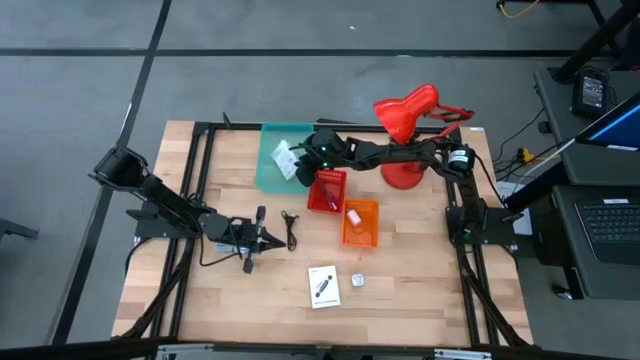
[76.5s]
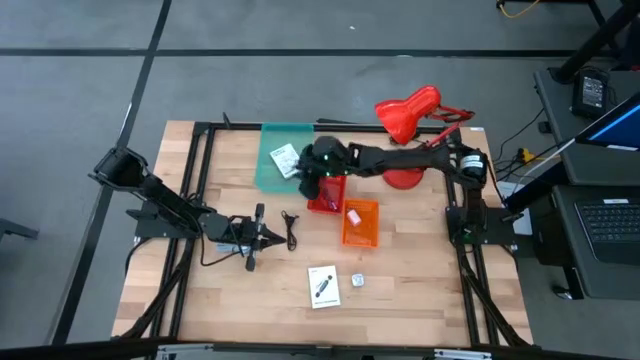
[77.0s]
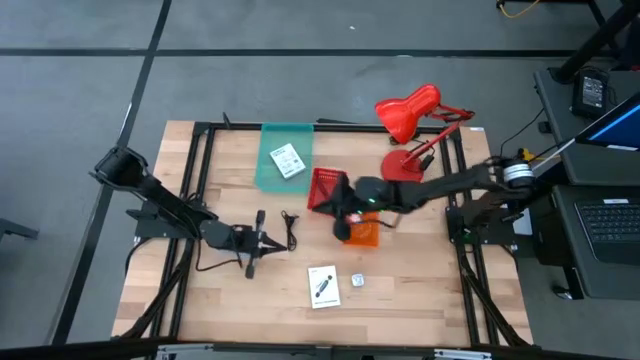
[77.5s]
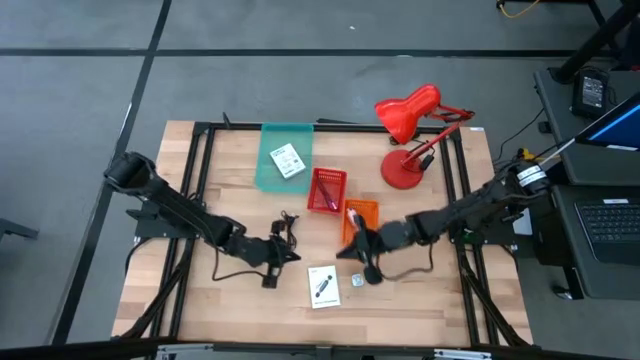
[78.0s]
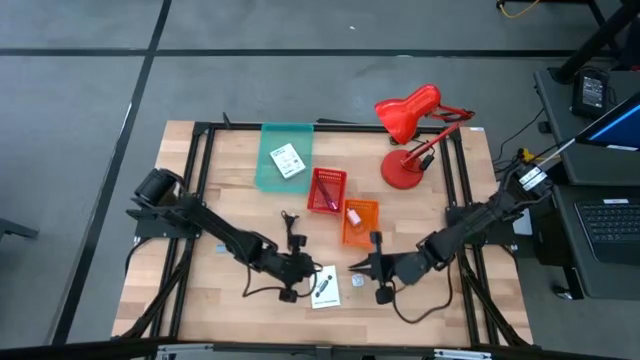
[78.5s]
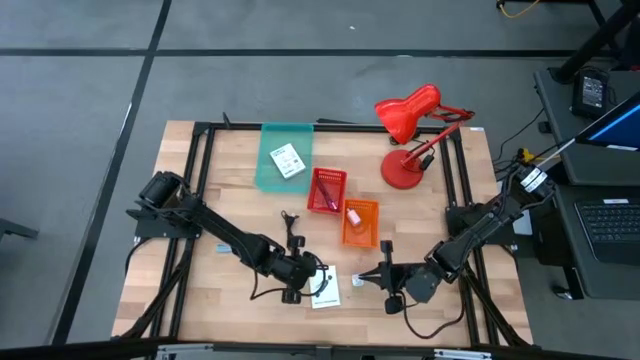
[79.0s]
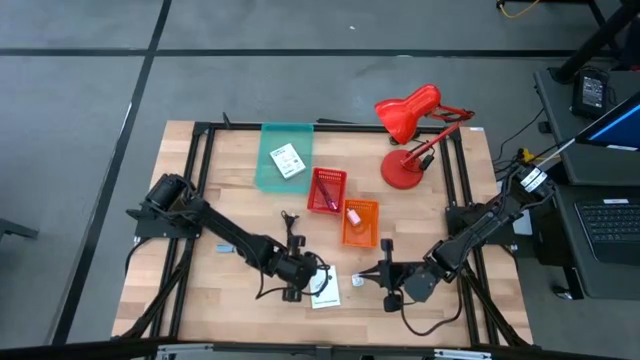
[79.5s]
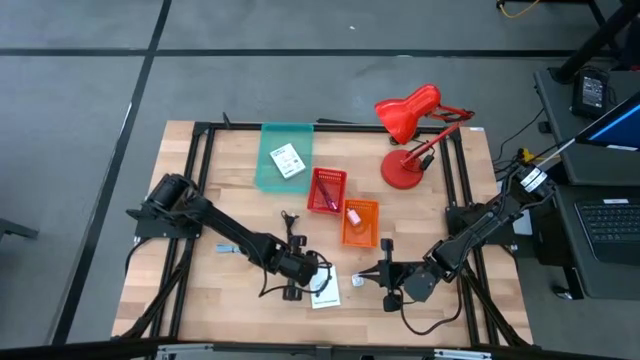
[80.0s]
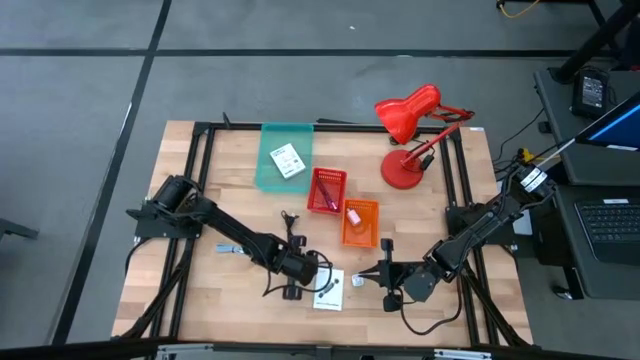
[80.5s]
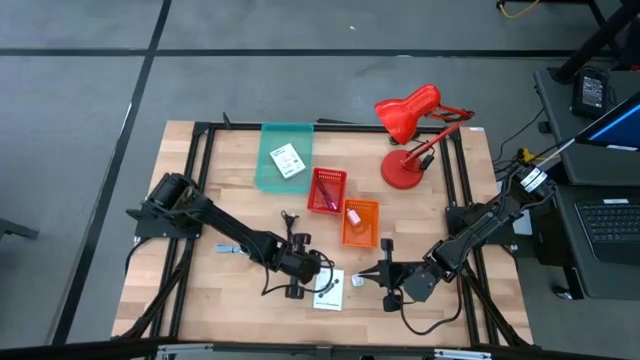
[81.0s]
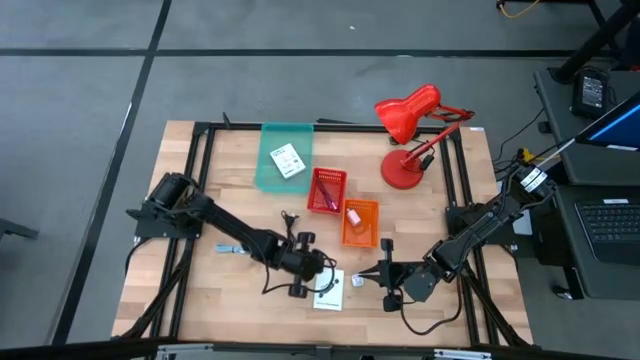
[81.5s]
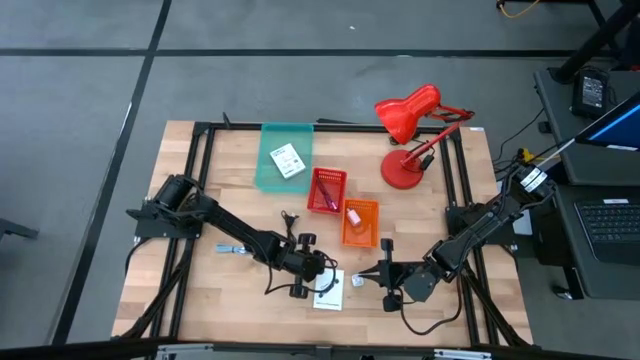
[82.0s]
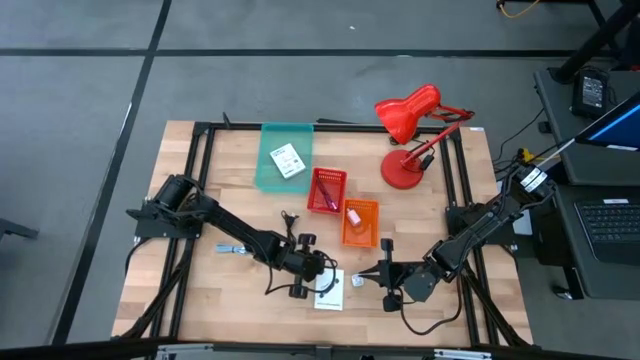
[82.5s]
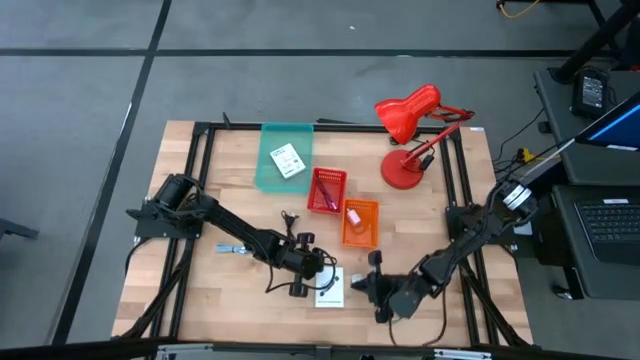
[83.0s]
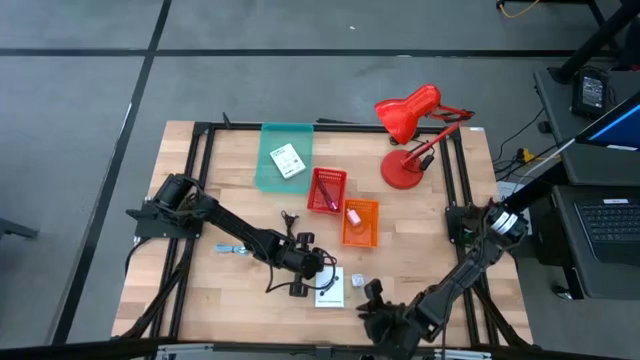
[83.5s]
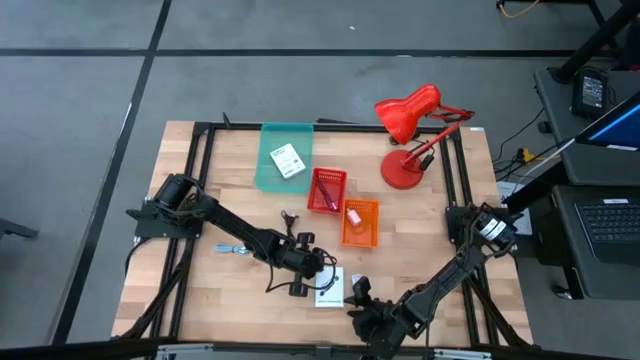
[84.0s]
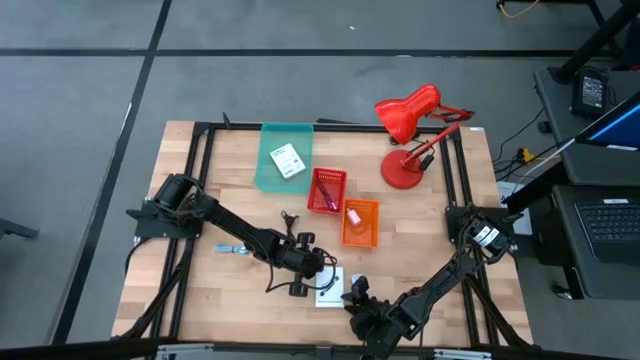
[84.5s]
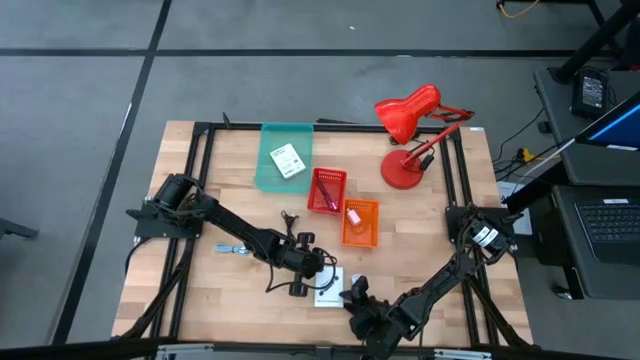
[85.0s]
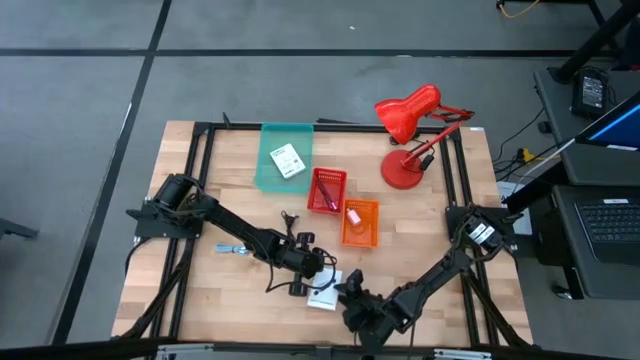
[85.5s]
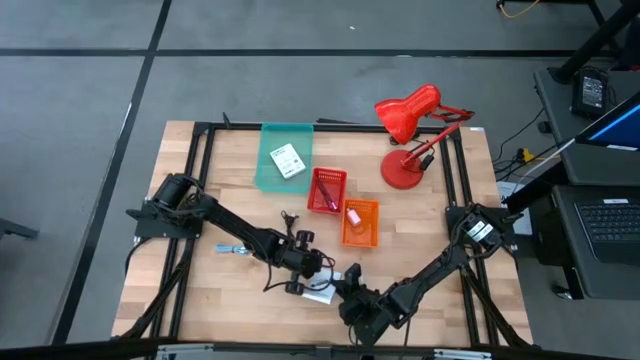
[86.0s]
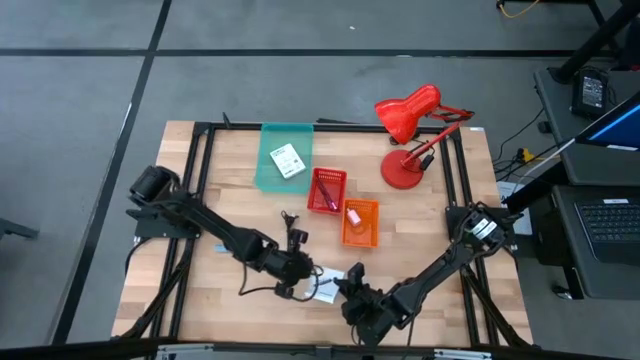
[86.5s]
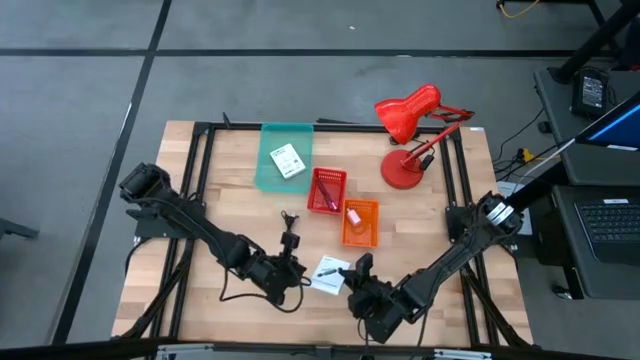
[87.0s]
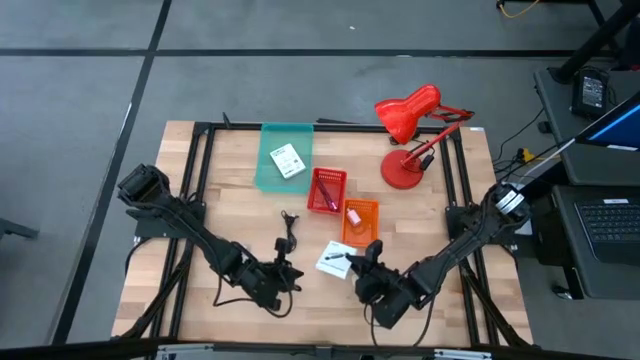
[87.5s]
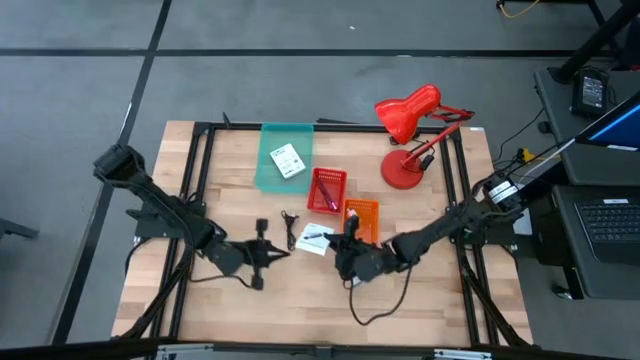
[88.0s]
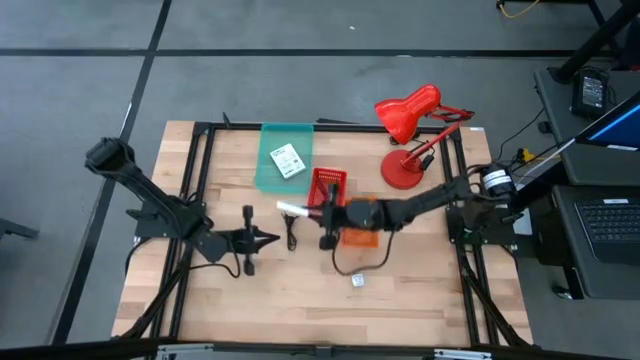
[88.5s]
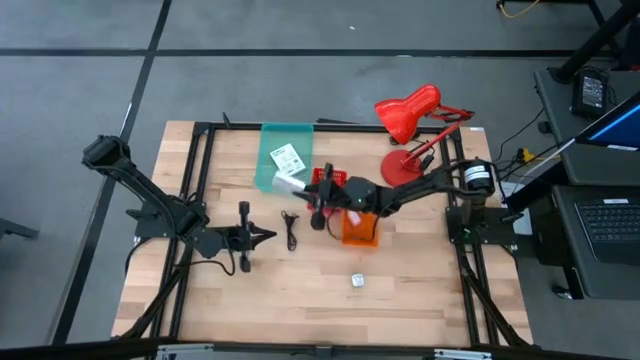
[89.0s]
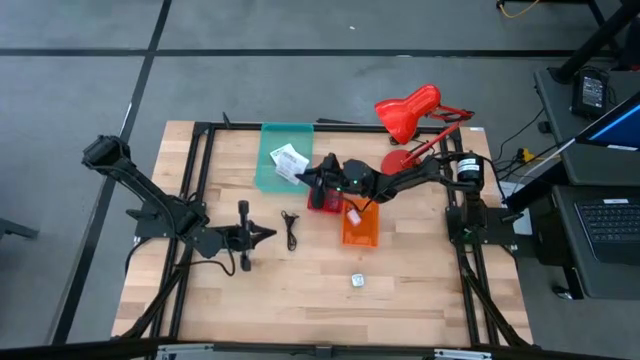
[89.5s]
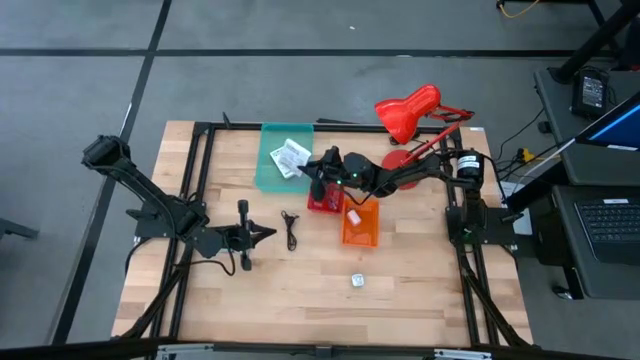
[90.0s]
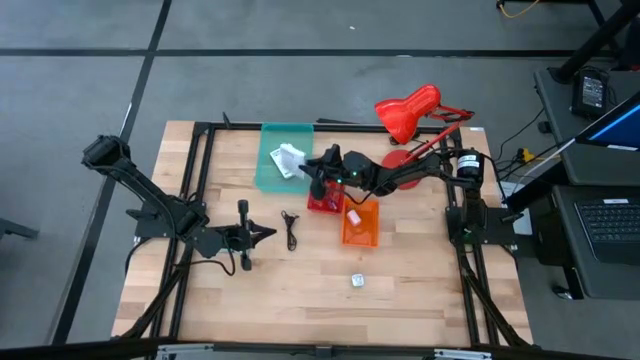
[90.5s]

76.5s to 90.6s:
Task: Pick and place items into bin
Put the left white card reader box into the blue bin

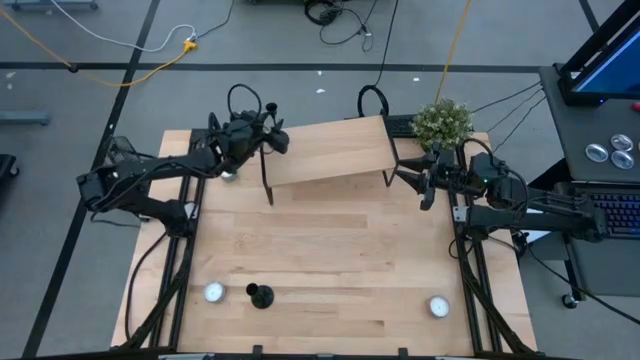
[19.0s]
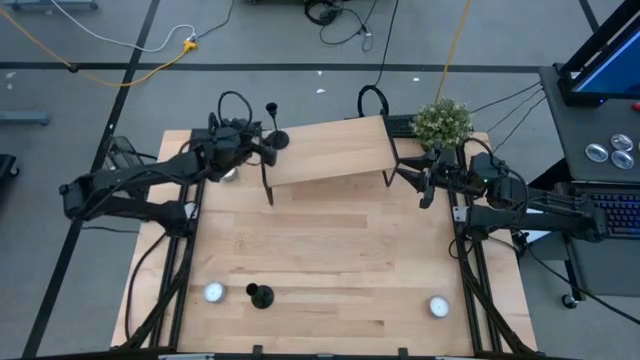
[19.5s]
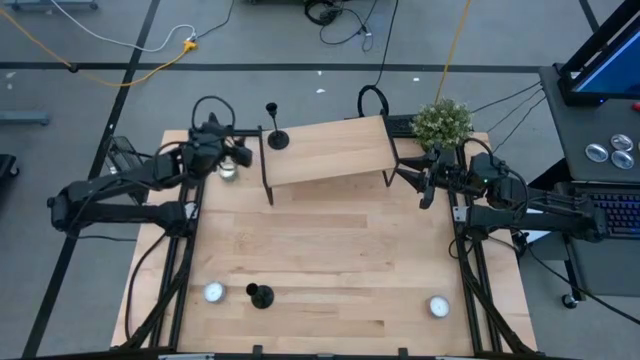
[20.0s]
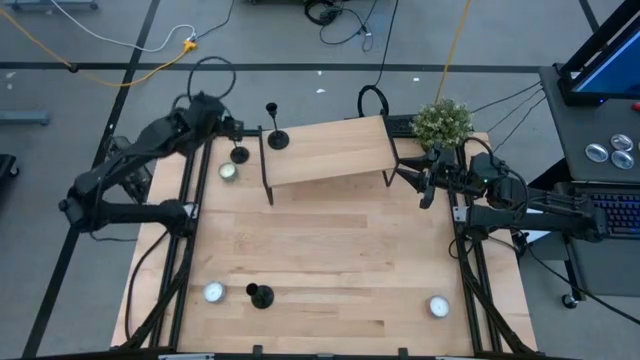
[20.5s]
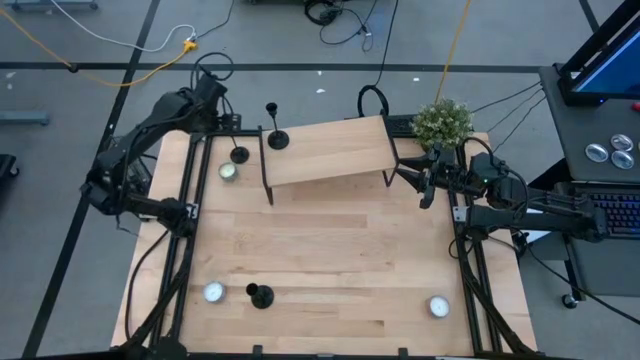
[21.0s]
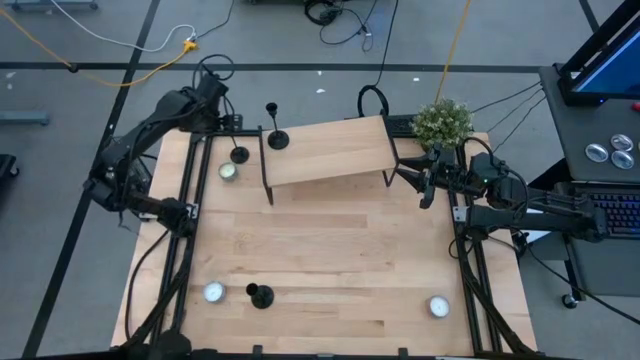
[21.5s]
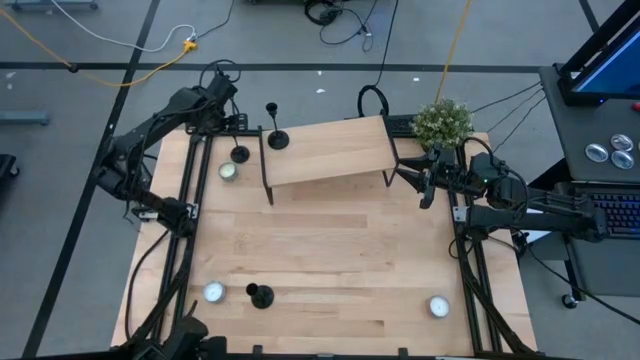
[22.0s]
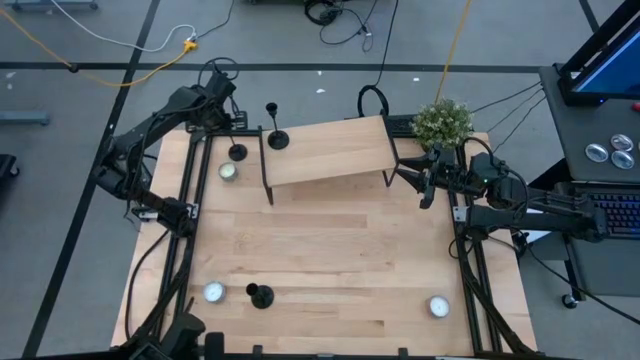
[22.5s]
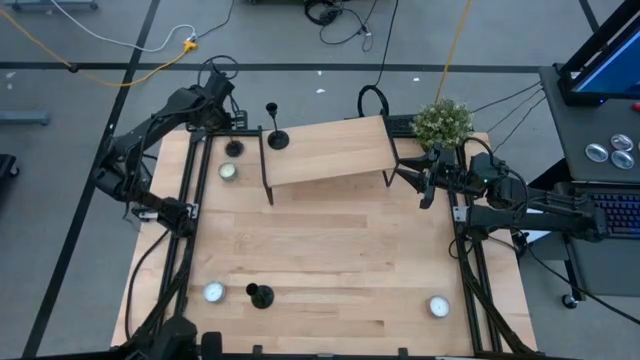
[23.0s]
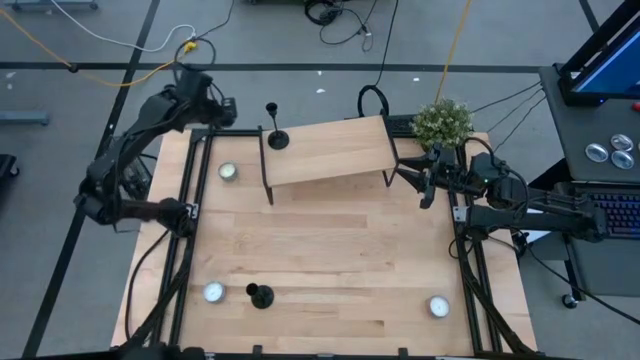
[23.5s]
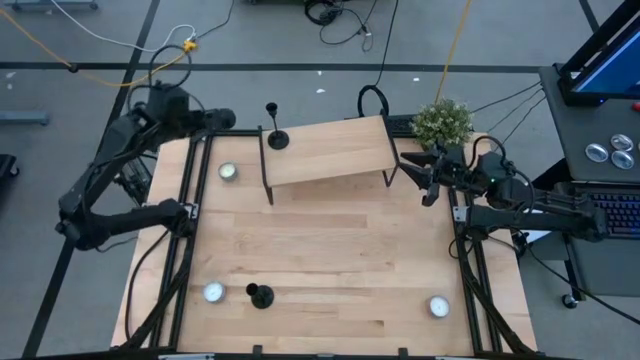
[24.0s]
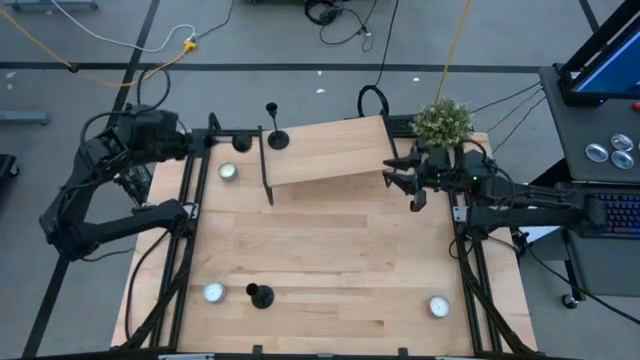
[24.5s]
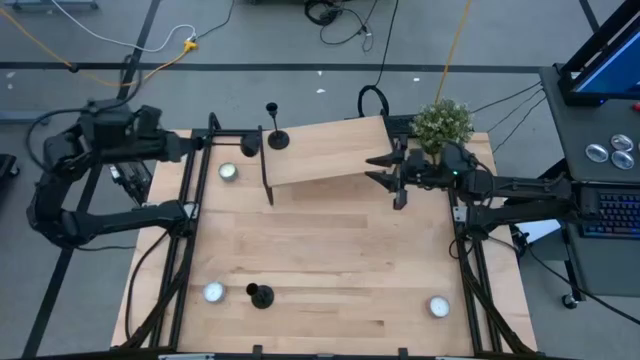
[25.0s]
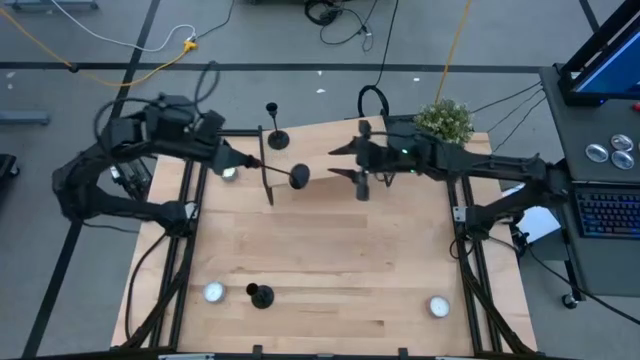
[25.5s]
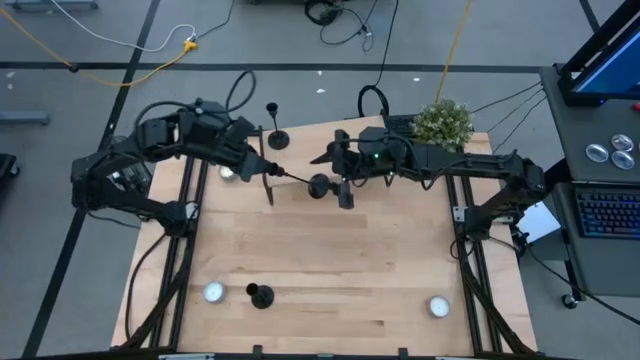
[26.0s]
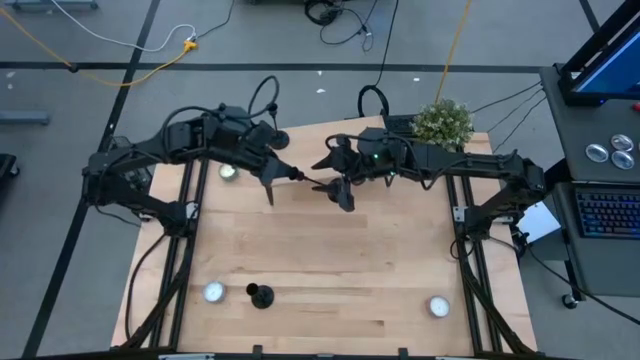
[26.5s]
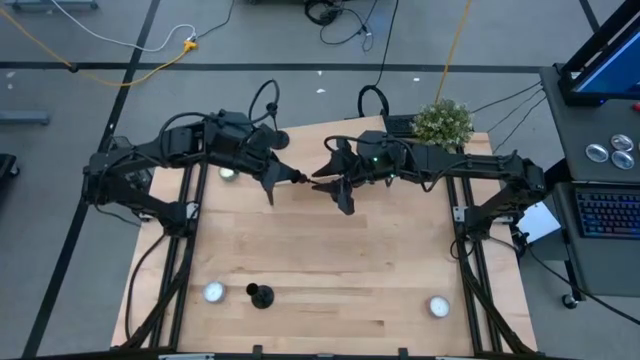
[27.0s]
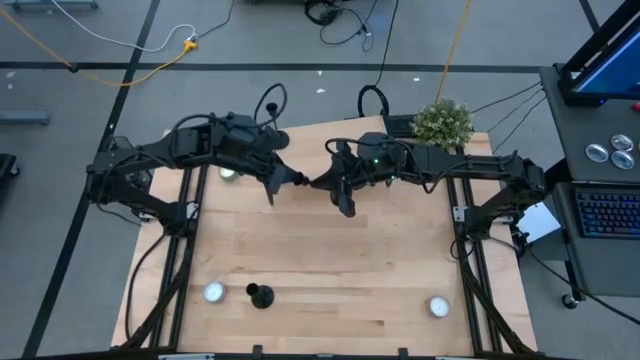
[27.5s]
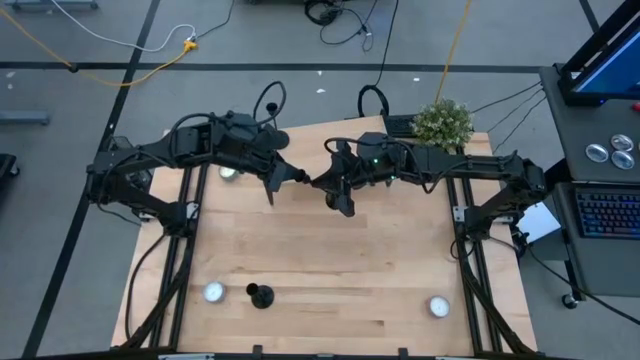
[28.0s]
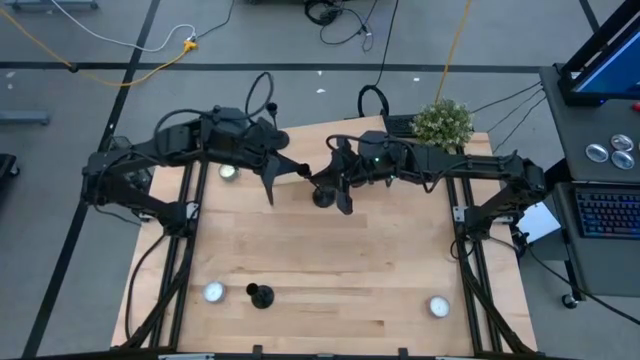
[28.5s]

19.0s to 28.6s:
Task: Pick & Place candle stick holders
Put the top candle holder on the shelf
